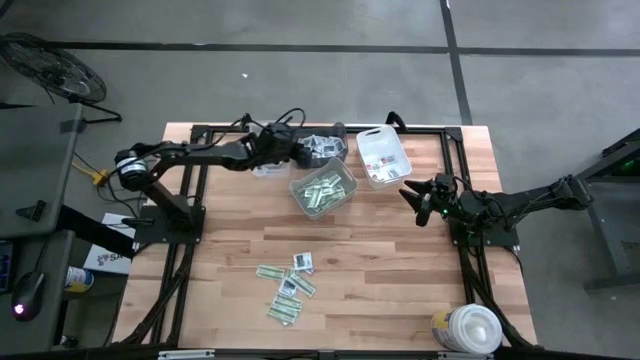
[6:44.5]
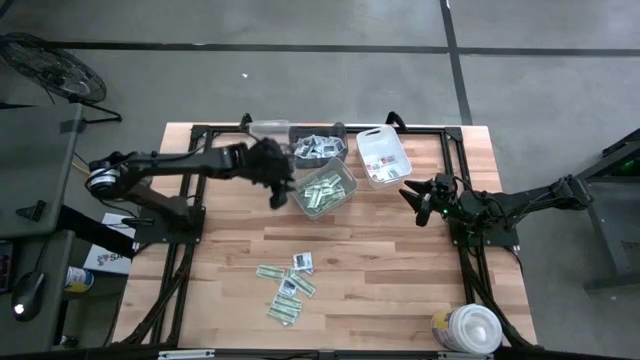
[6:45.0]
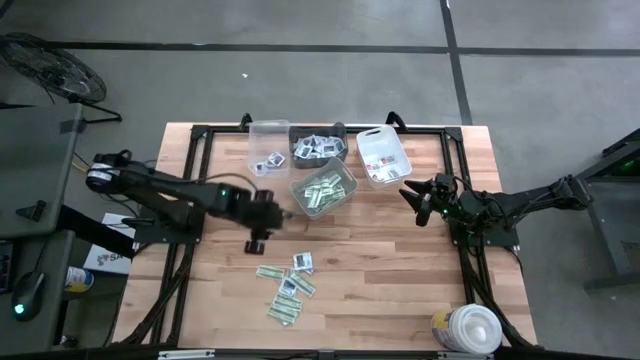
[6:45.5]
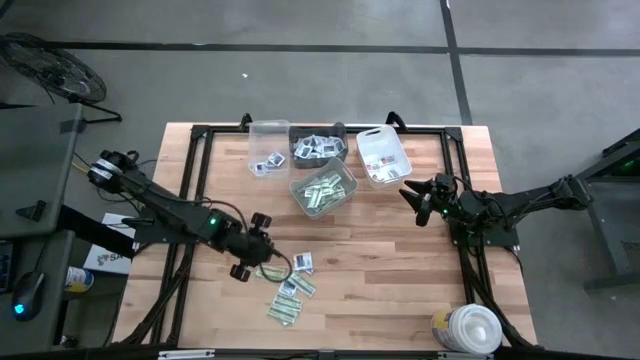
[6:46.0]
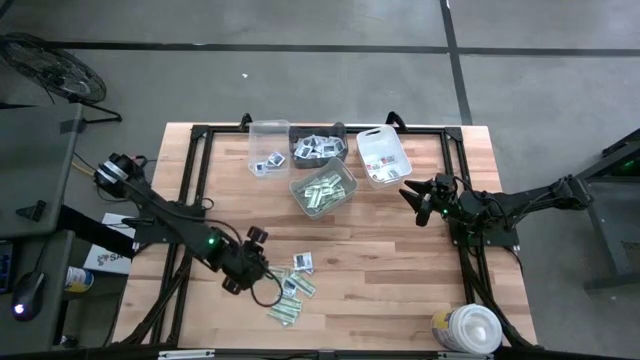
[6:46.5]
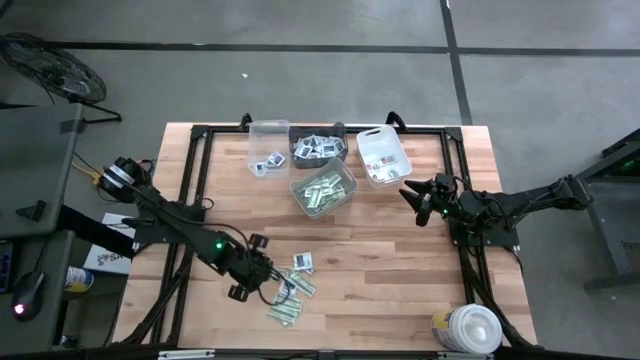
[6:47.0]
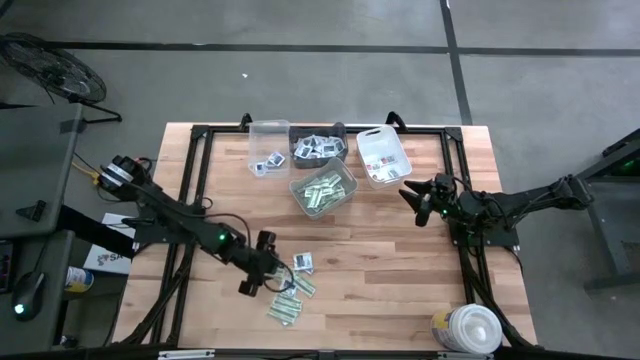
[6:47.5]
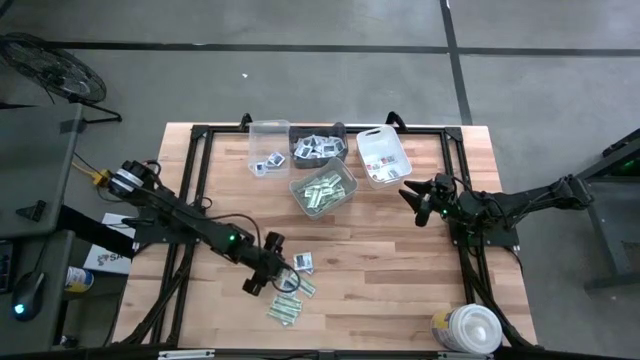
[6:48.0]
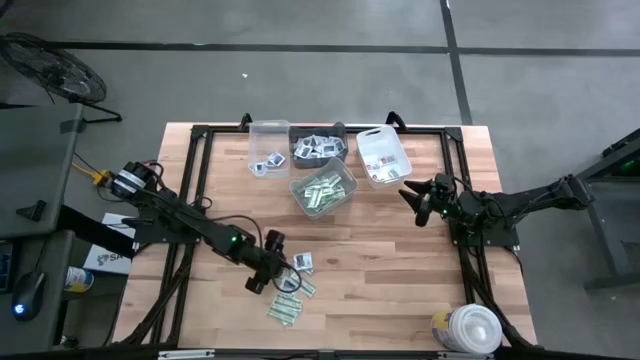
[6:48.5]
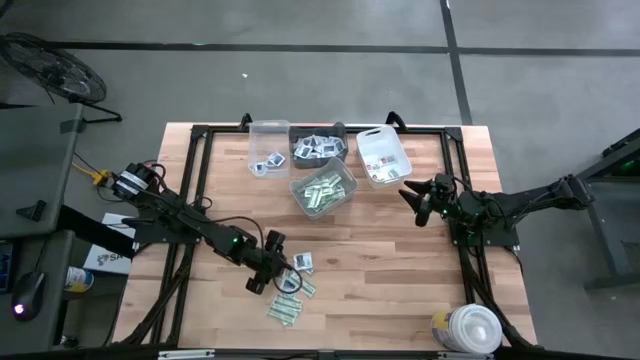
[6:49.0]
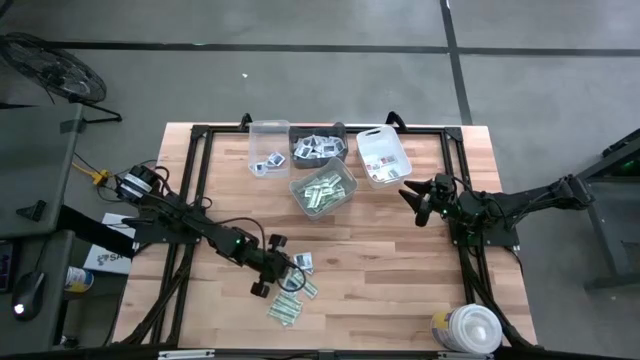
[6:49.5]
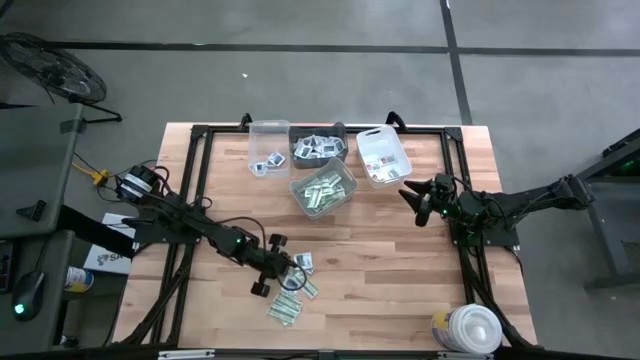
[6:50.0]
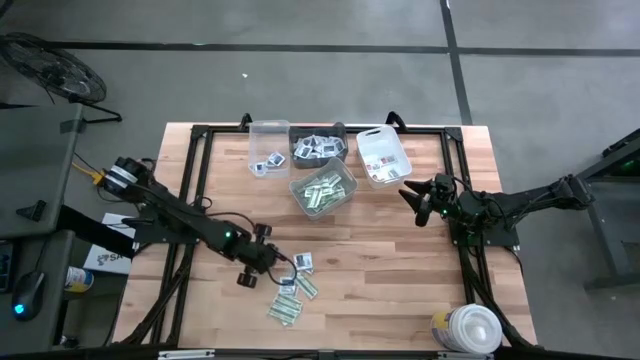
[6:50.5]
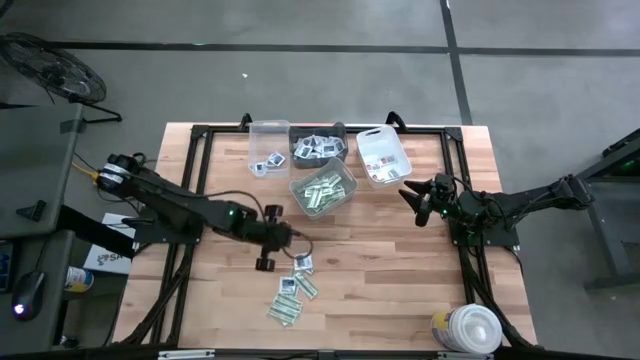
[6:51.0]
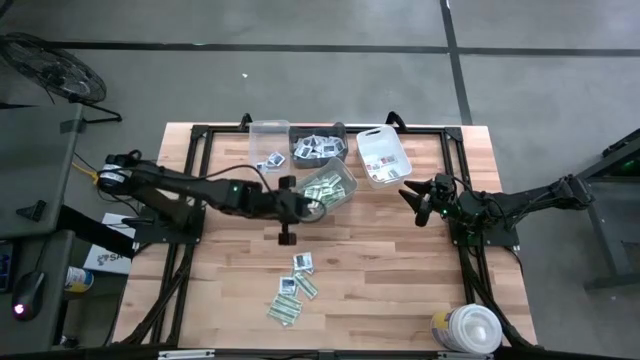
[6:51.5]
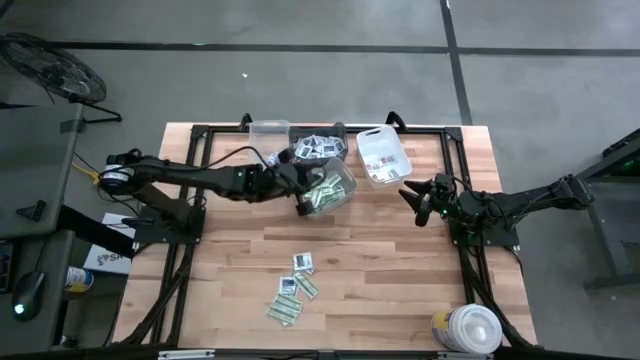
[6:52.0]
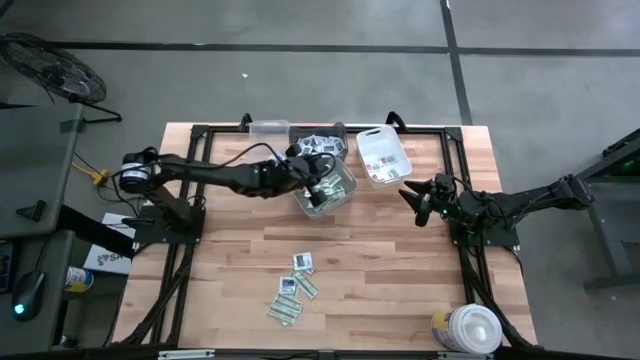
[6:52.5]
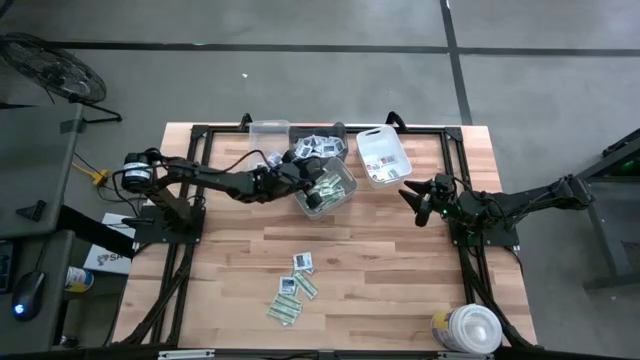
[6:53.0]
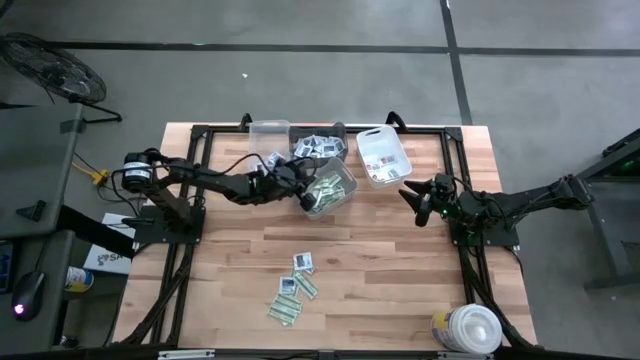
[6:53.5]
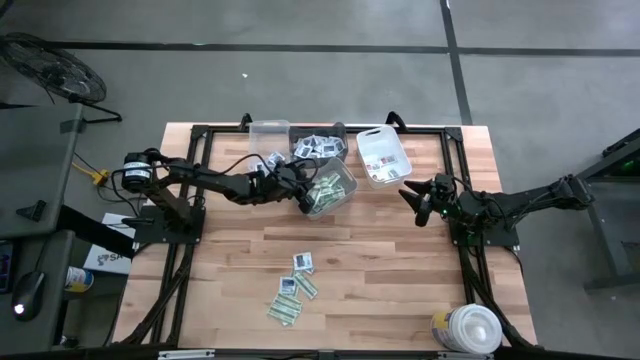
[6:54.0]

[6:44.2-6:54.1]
Task: Pick & Place First Aid Supplies
Put the bandage pack into the gray bin

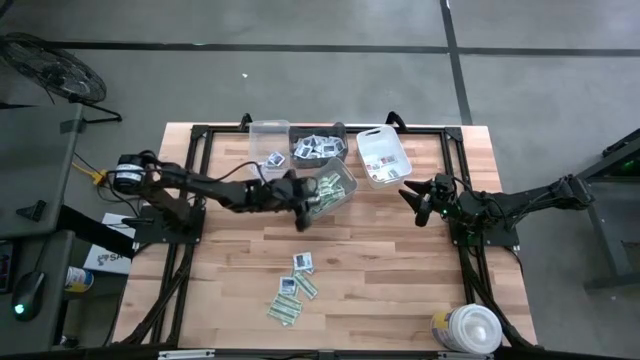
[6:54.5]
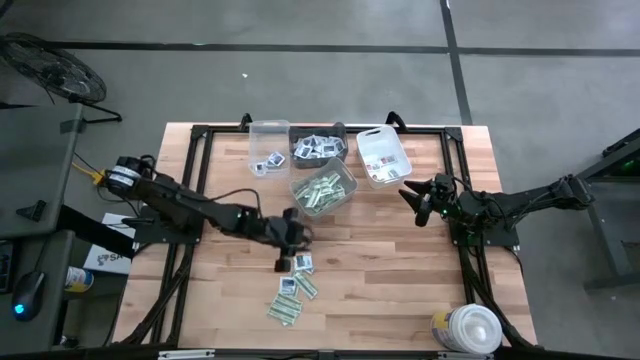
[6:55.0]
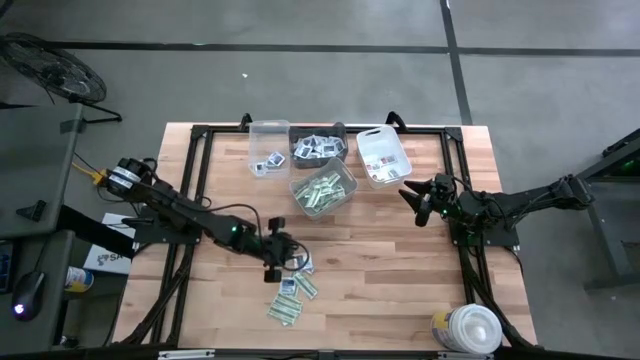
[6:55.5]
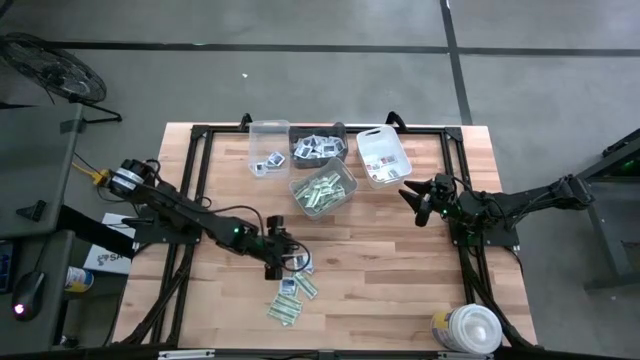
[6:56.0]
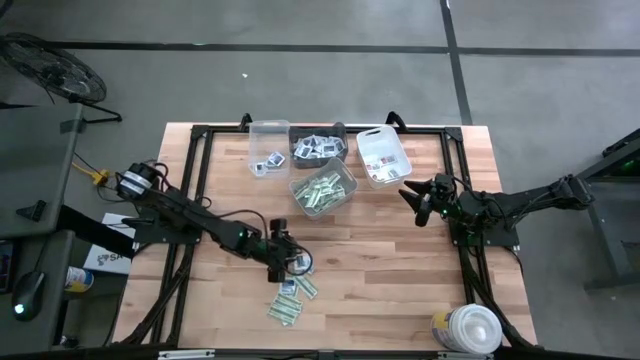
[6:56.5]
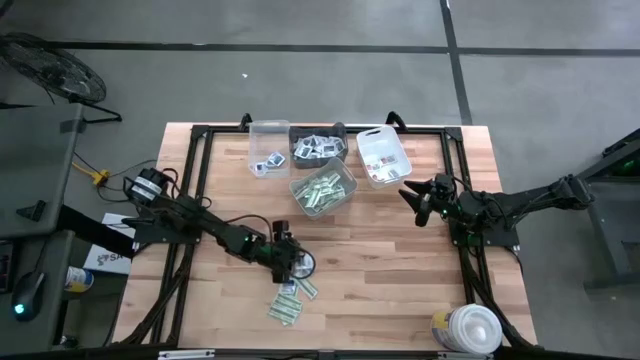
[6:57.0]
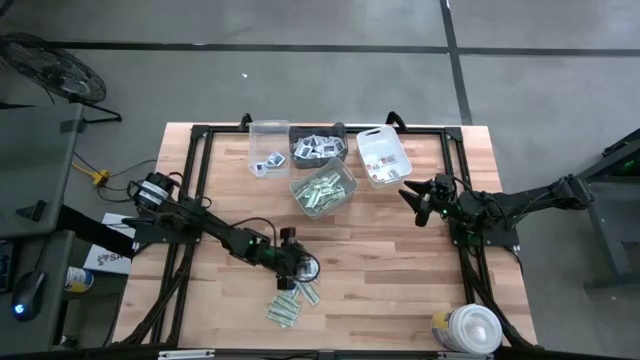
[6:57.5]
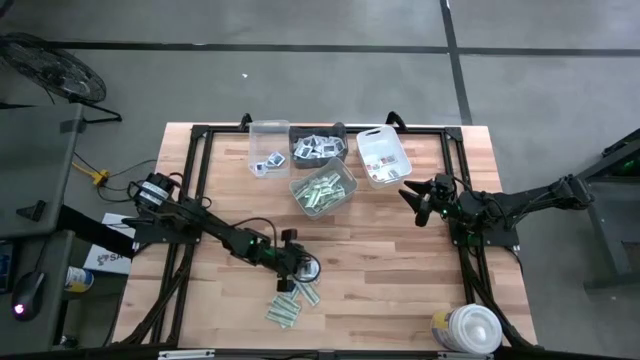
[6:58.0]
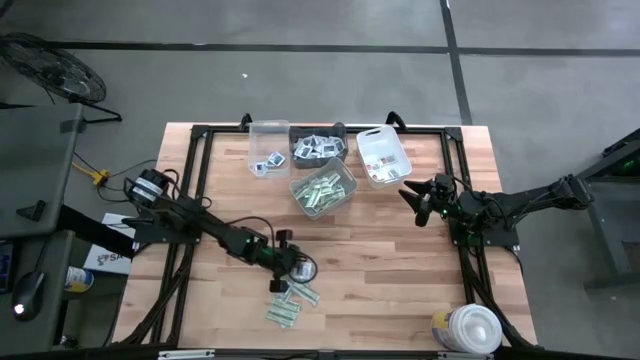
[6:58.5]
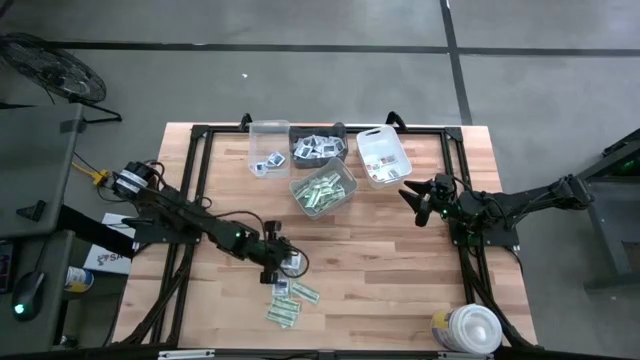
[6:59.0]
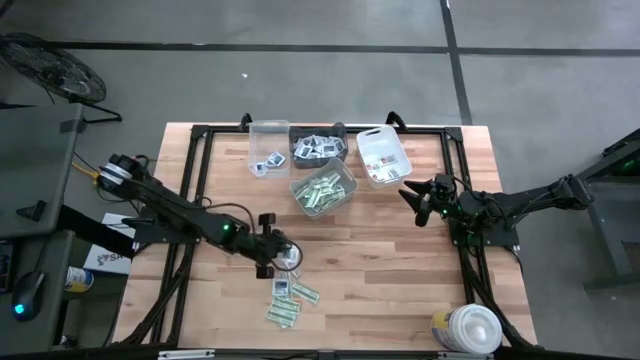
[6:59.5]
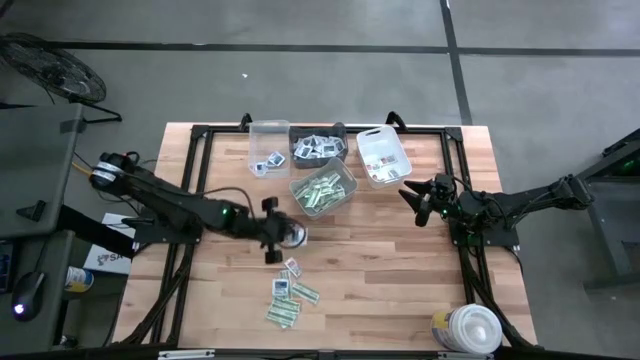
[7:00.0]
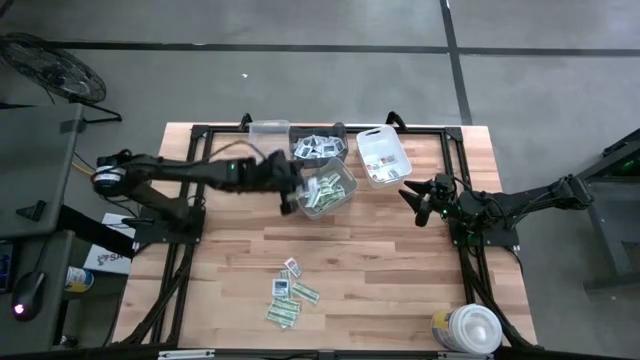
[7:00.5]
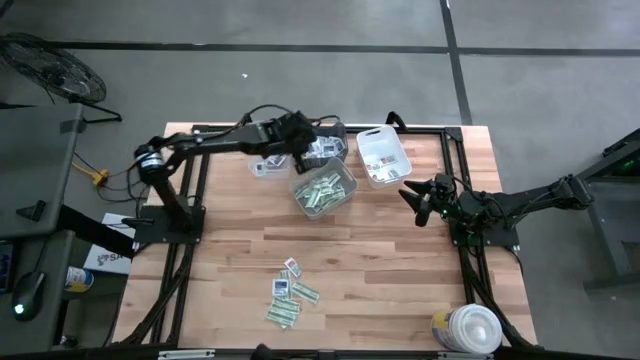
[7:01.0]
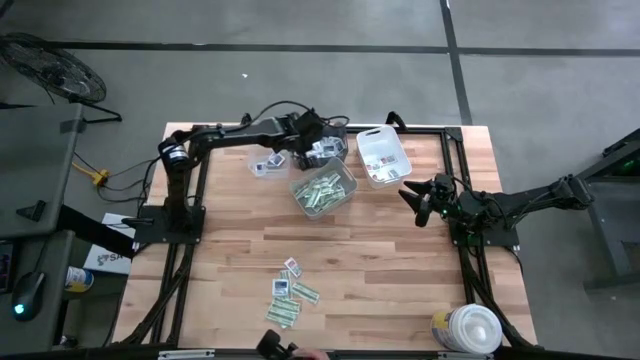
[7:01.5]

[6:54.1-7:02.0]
Put the towelette pack into the black bin

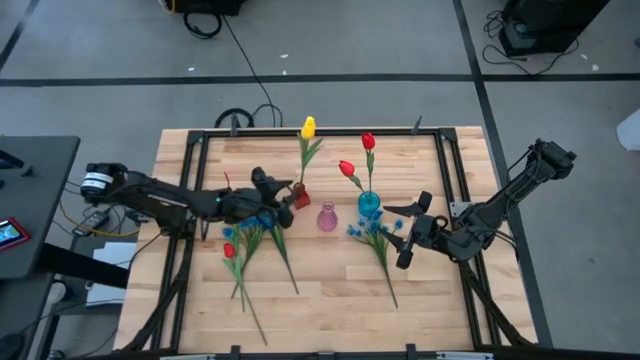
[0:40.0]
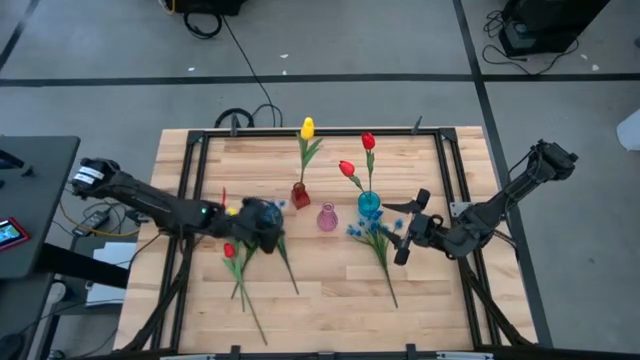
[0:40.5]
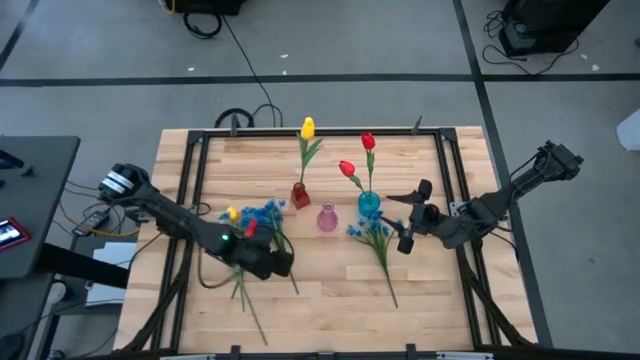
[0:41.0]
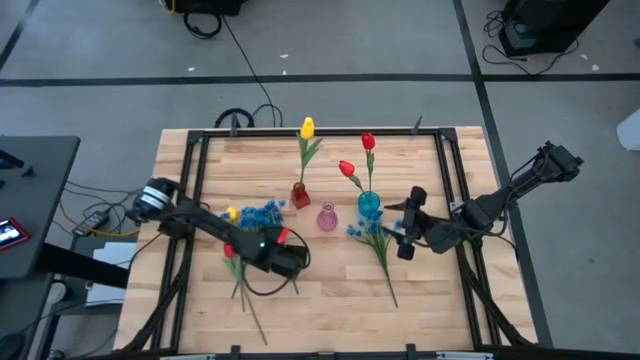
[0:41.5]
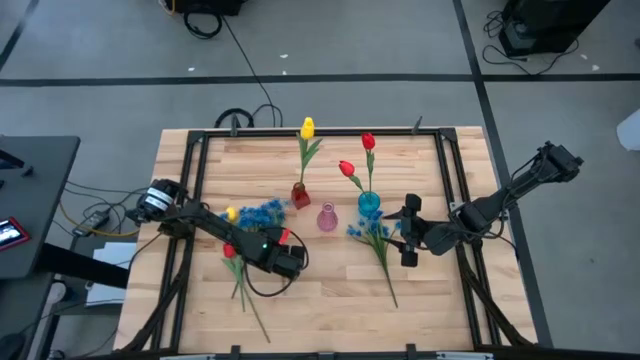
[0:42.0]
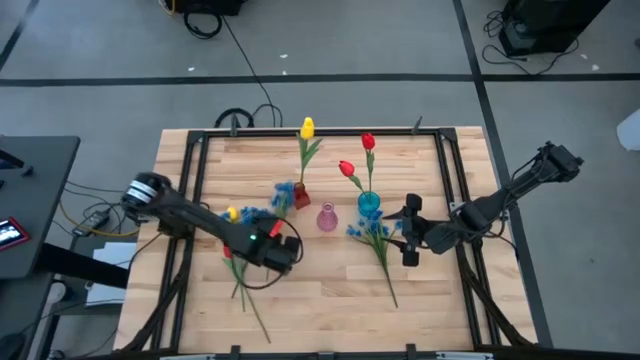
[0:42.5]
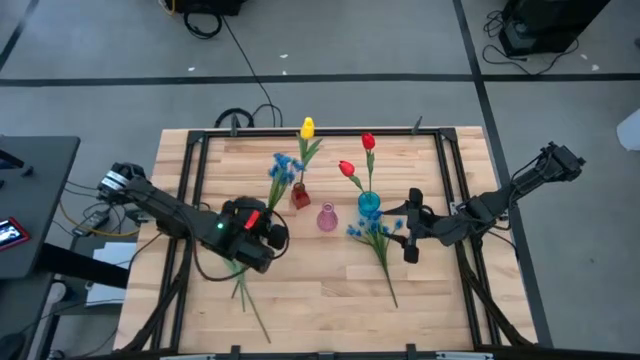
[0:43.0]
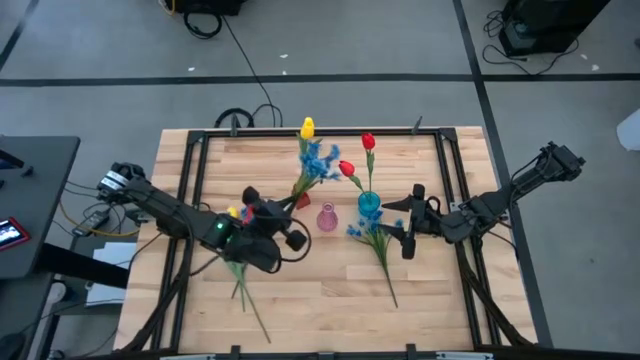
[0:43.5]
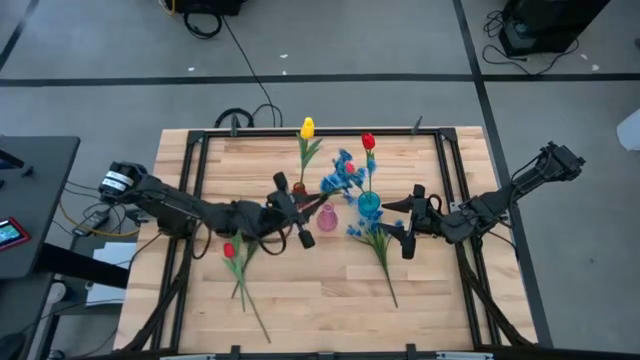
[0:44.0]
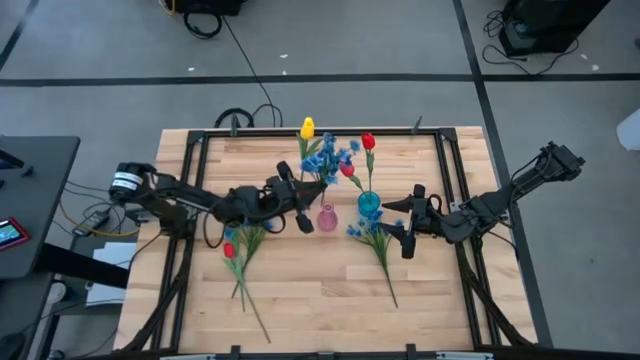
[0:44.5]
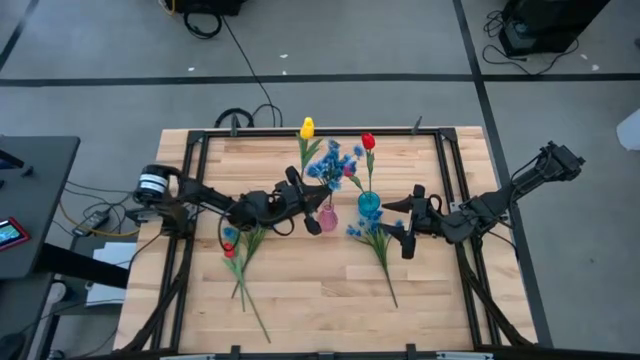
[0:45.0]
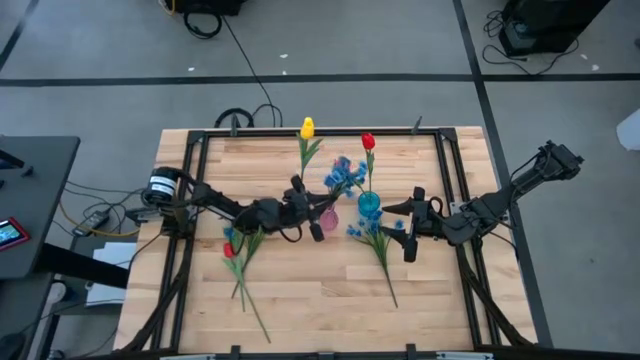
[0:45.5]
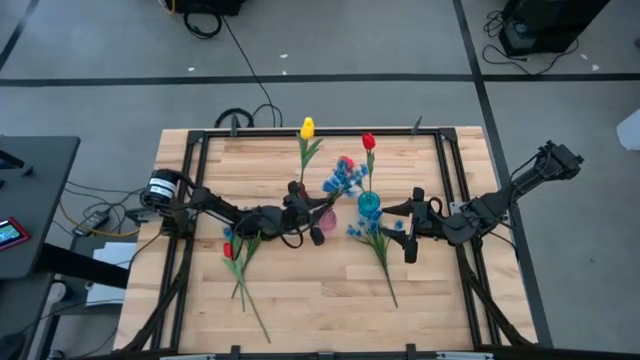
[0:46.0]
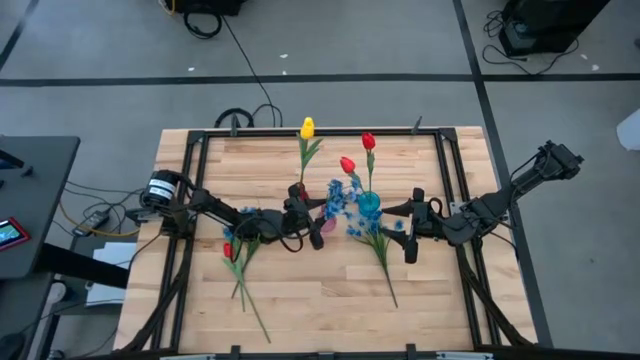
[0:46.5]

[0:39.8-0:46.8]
Task: Sort flowers into vase by color
Put the blue flowers into the pink transparent vase
